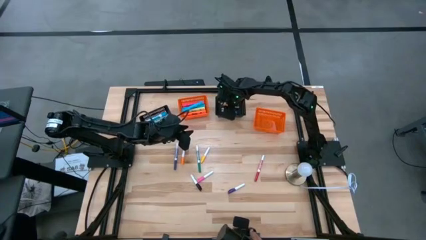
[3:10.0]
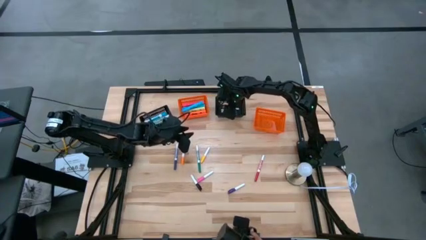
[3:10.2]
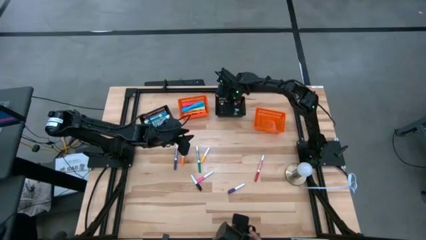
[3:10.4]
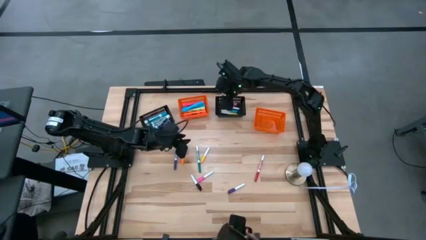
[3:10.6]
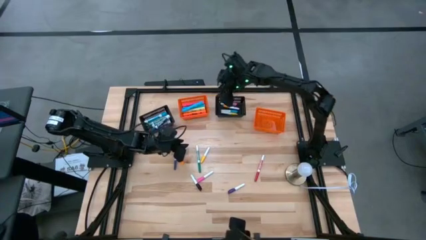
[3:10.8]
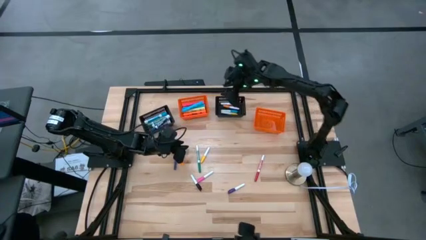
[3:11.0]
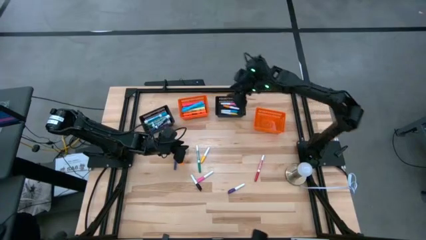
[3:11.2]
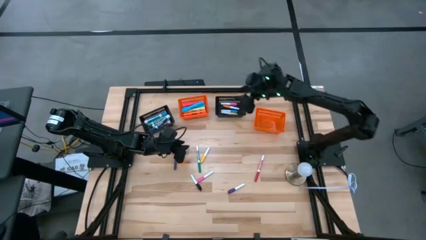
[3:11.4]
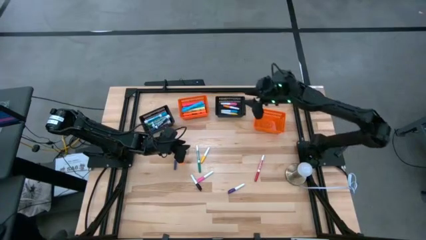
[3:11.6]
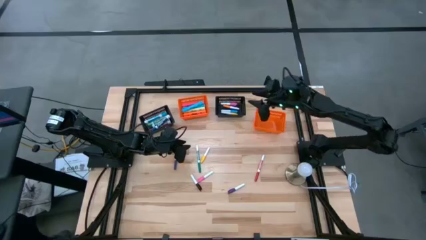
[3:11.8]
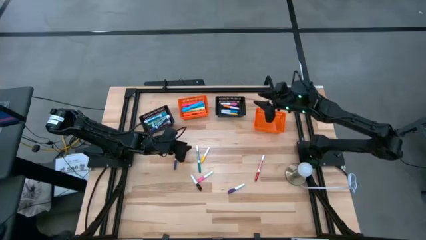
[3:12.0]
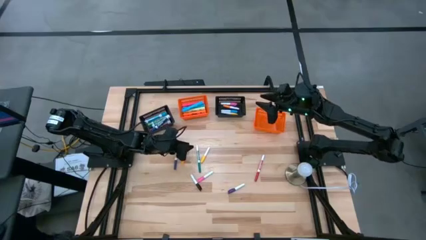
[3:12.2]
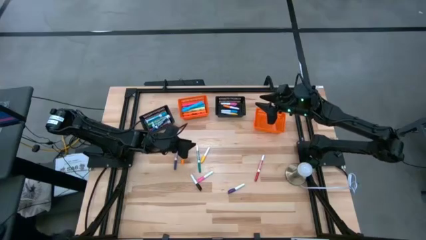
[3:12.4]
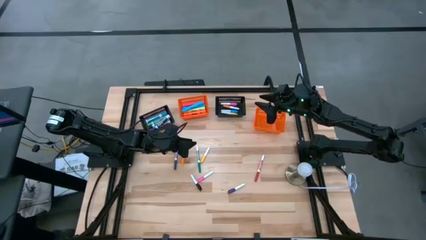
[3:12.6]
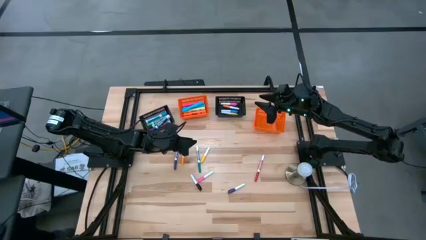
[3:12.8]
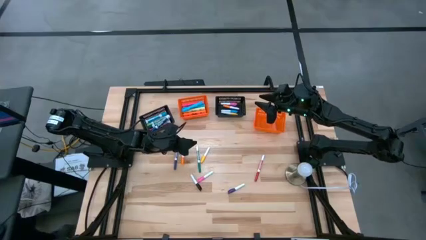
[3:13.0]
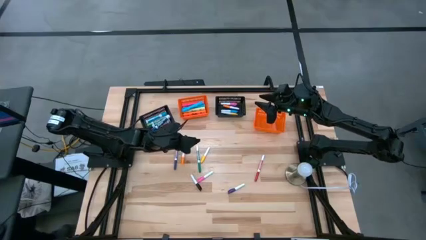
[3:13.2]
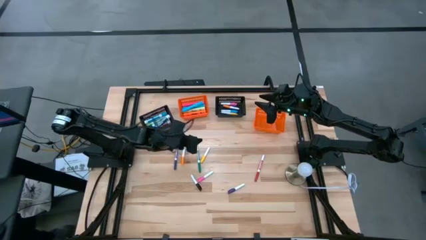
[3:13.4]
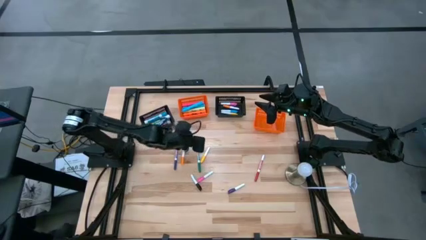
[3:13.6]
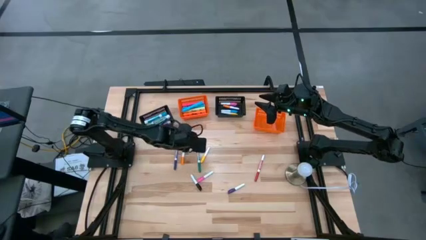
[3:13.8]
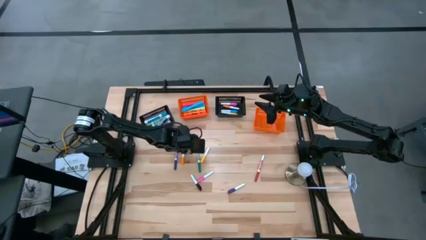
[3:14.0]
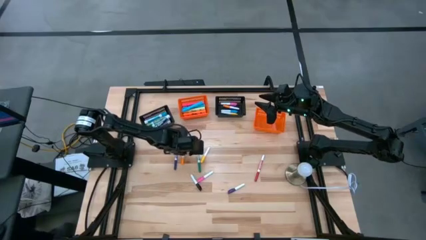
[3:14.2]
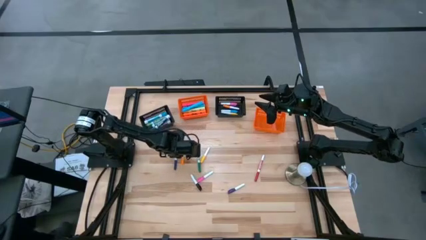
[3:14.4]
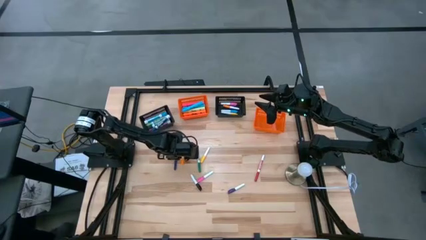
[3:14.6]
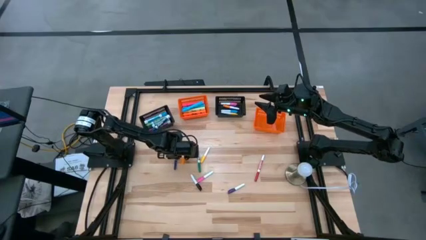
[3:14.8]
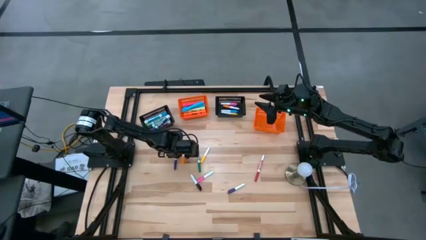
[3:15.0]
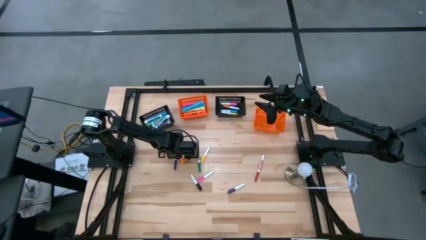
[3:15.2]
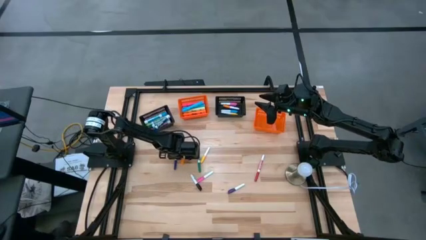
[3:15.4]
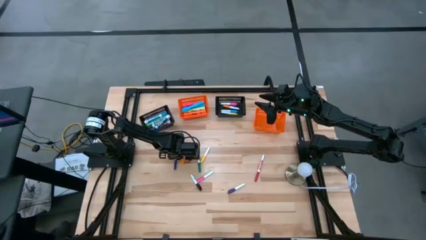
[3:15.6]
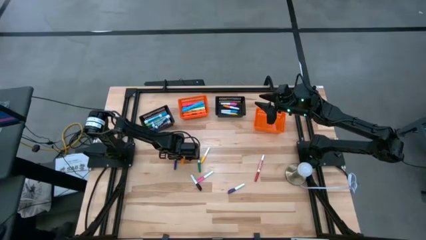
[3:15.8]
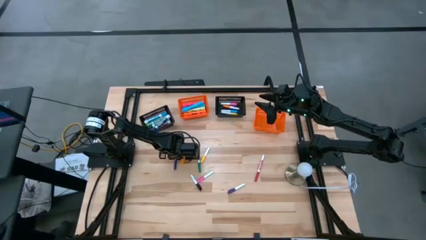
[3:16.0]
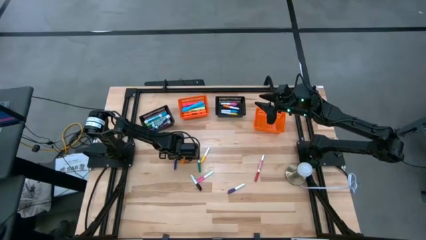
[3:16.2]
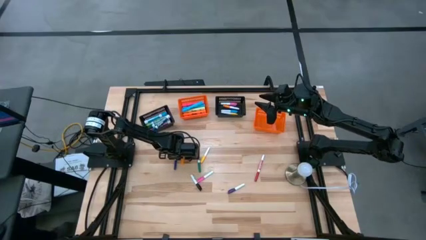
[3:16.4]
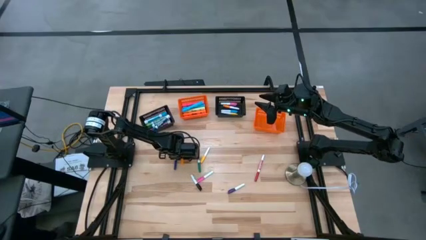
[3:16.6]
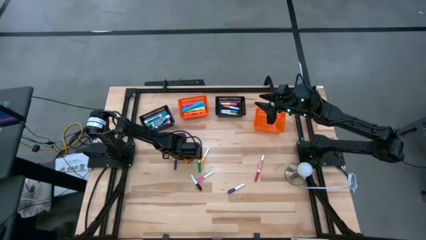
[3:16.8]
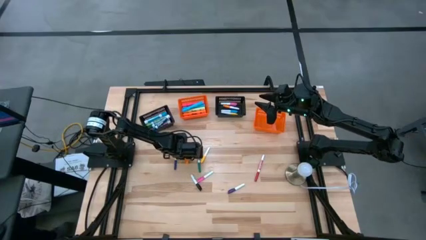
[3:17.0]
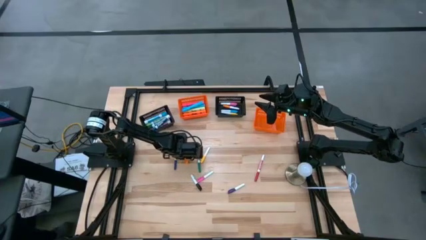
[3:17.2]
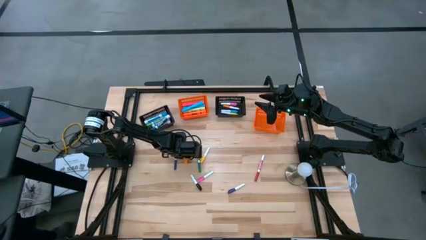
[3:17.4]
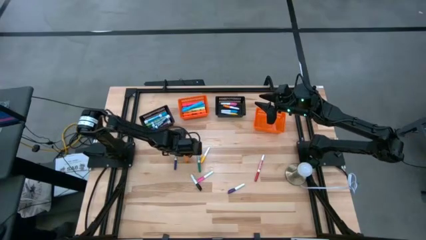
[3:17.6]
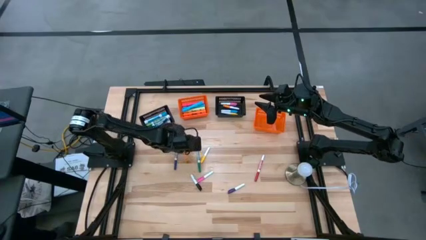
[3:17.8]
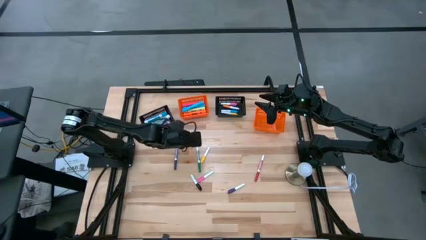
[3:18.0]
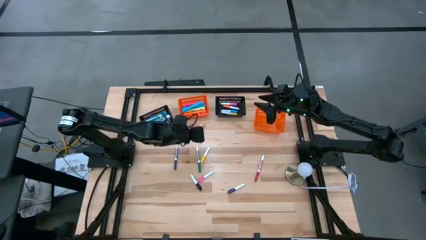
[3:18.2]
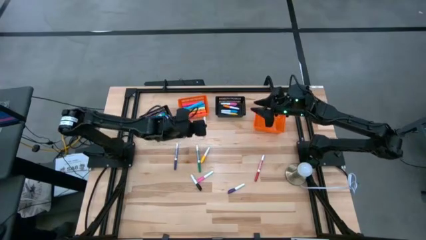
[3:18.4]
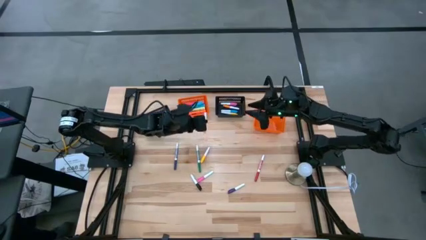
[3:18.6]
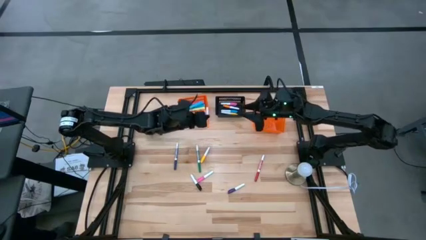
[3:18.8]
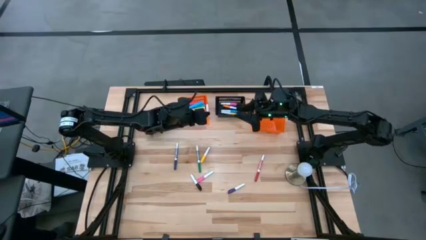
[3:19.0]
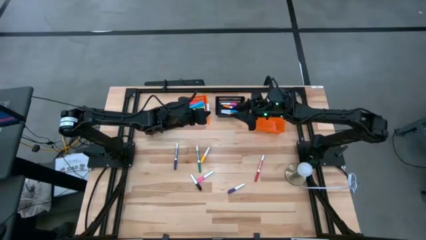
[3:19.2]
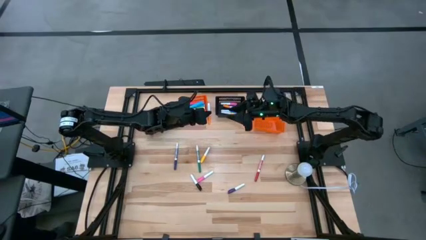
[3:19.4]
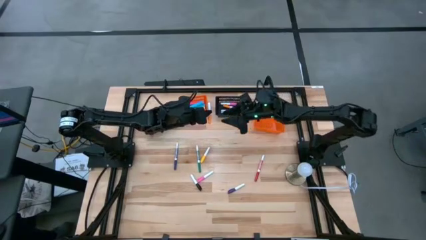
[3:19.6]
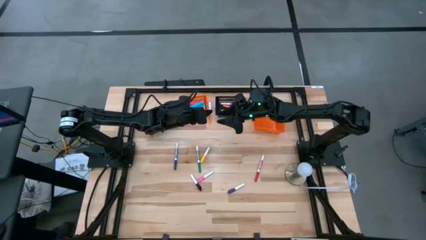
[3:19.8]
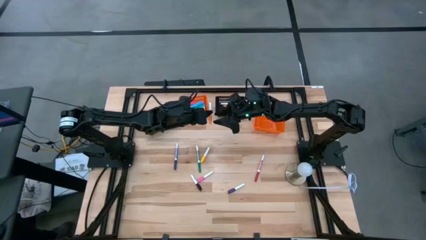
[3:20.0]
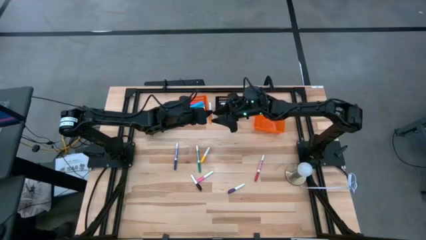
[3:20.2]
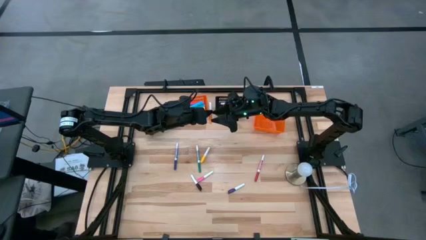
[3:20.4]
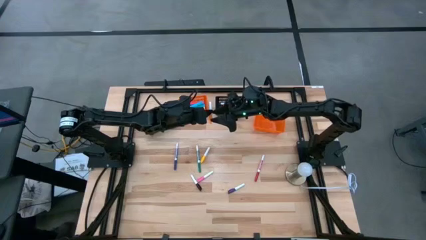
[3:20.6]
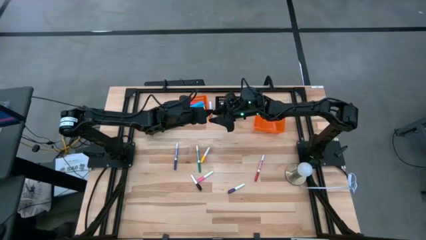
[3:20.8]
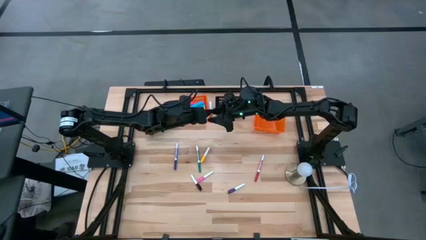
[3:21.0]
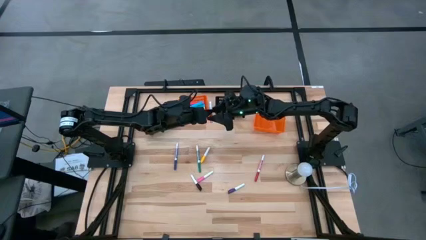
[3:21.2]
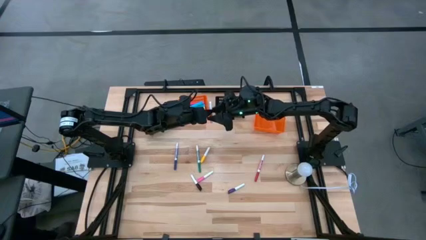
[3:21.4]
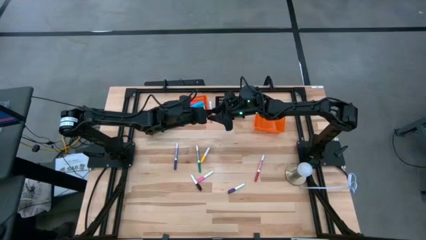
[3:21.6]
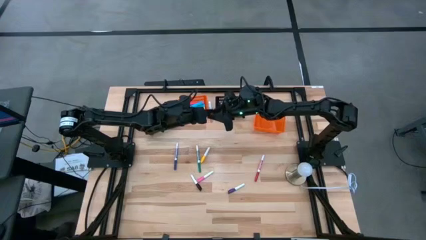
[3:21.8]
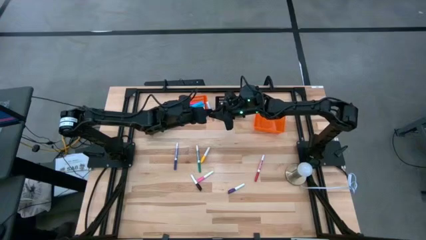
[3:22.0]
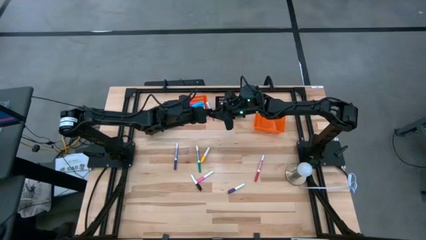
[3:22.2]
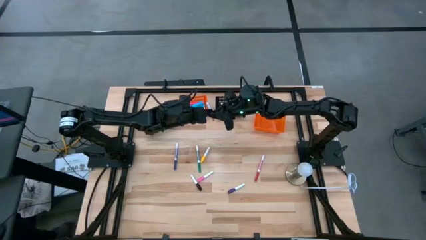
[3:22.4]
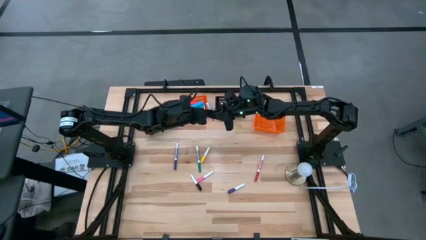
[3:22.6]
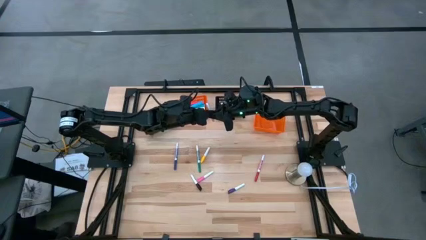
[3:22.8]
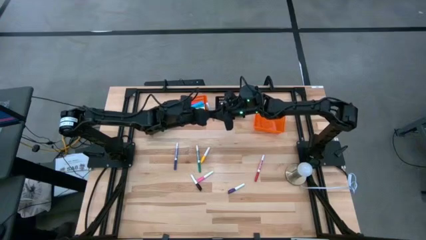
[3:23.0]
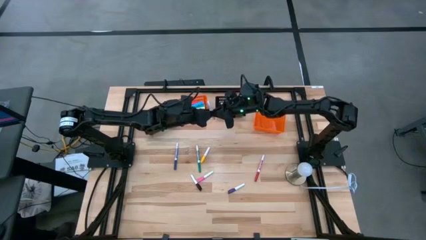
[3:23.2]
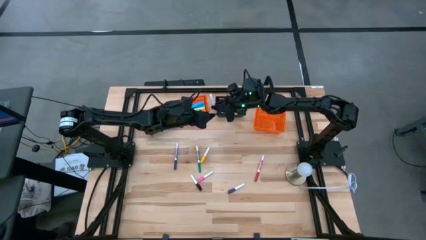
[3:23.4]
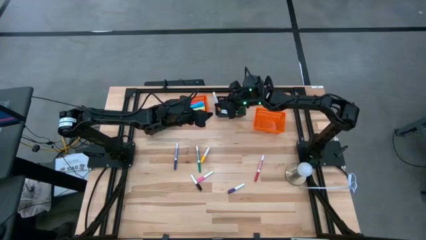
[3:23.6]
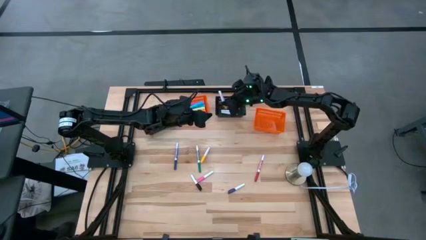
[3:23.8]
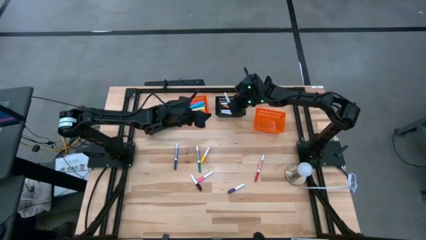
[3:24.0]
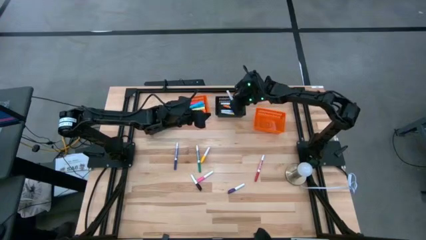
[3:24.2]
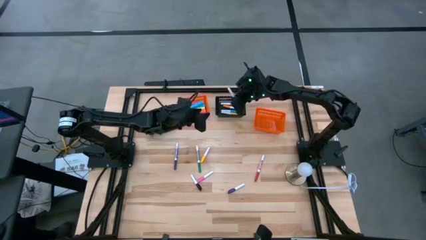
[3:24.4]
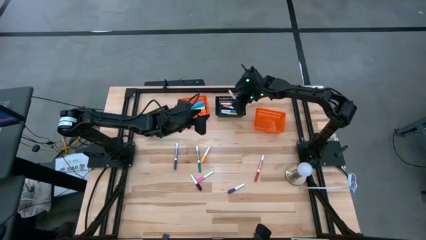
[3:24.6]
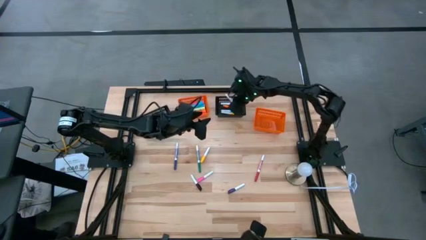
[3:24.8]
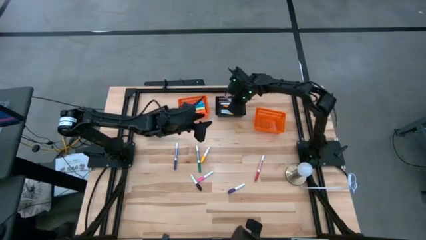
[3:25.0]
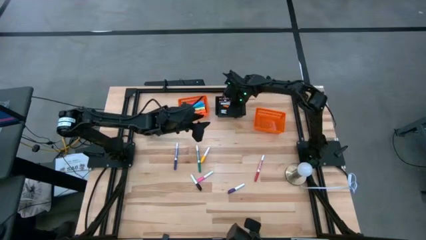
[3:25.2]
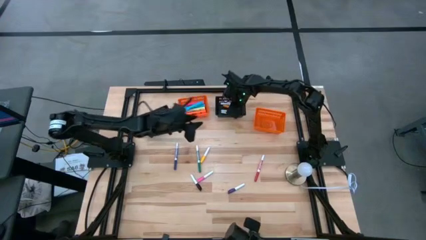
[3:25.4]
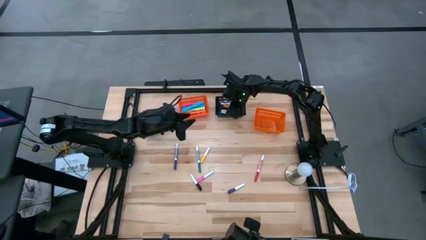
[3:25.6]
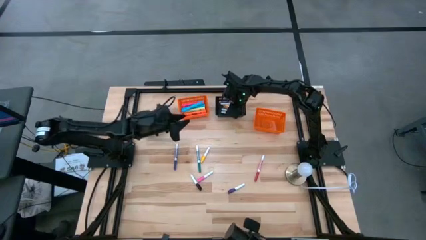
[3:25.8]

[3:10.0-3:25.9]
Task: Pick & Place Markers
Put the small orange highlighter pen into the right black bin
